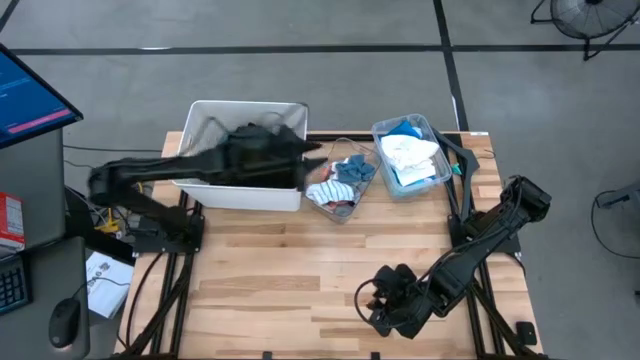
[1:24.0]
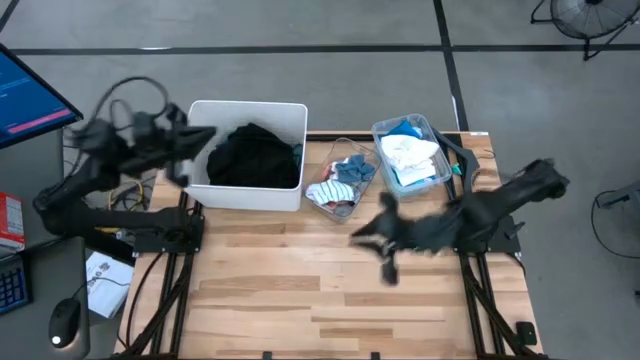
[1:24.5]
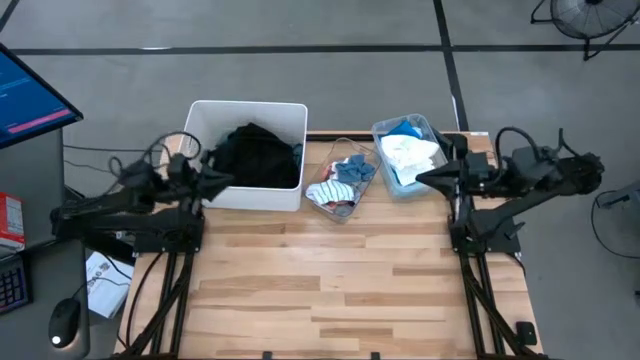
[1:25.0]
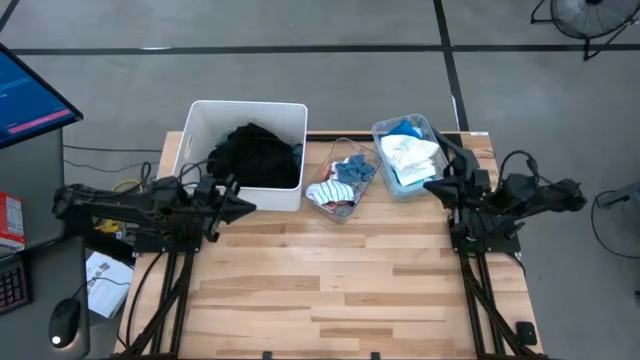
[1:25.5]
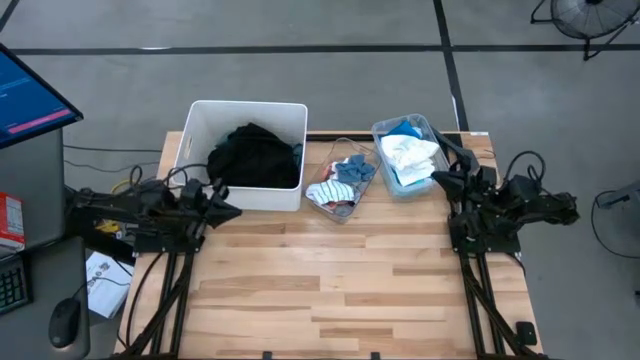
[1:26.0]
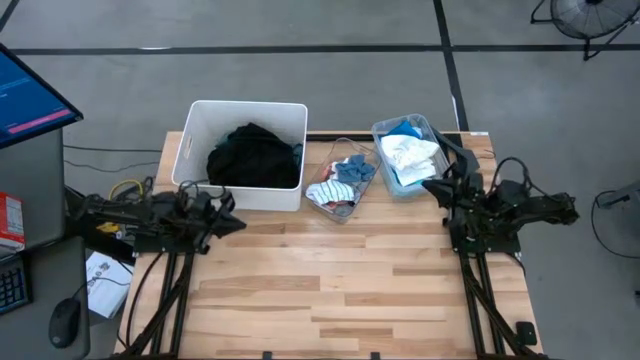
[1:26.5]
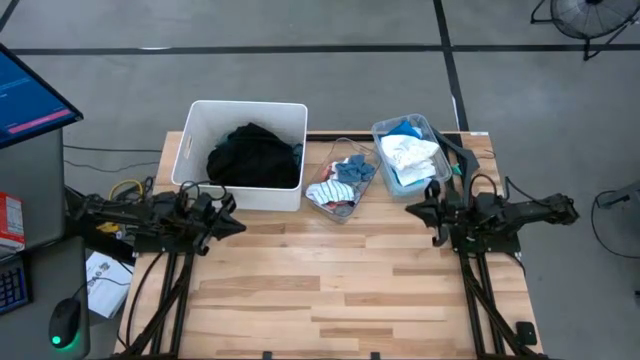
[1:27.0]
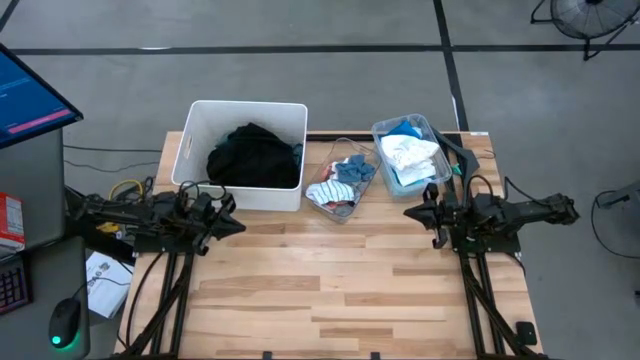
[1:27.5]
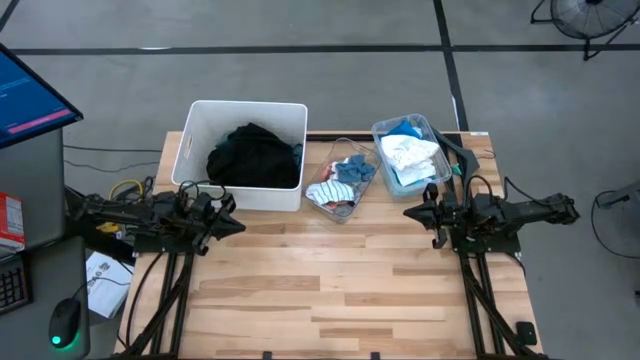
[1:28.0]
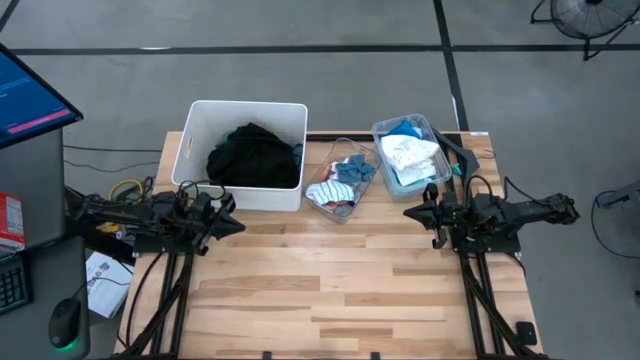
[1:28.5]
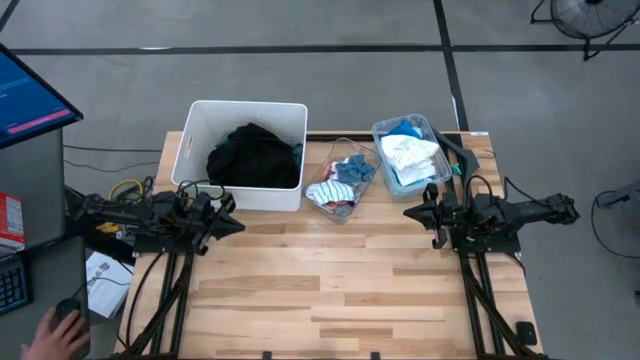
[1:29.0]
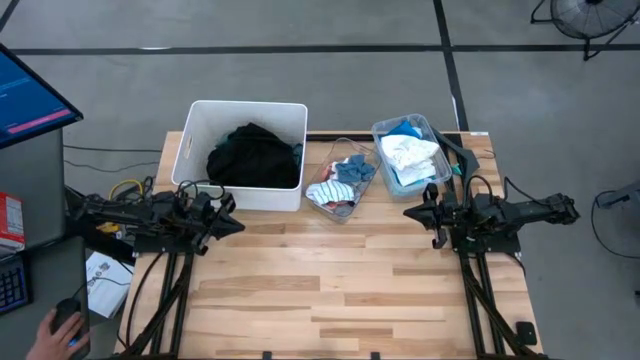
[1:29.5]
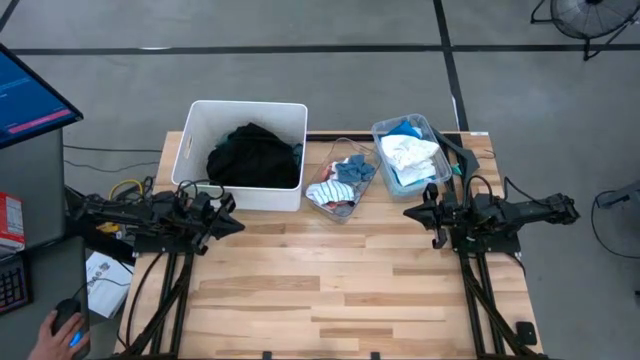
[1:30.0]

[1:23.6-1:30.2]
Task: Pick & Place Cloths
Return to Home Position

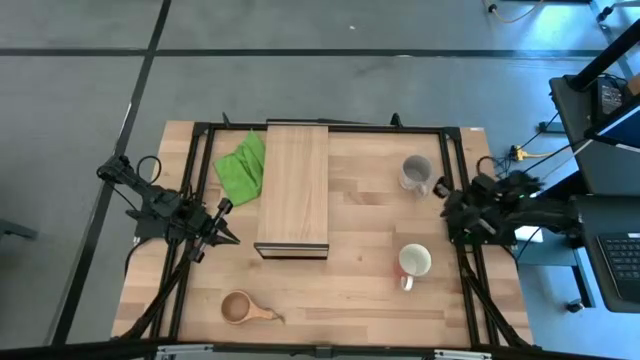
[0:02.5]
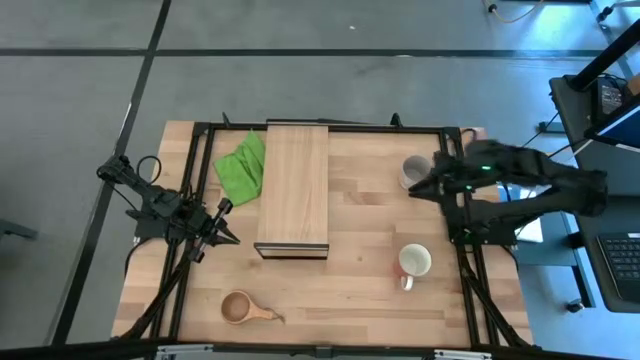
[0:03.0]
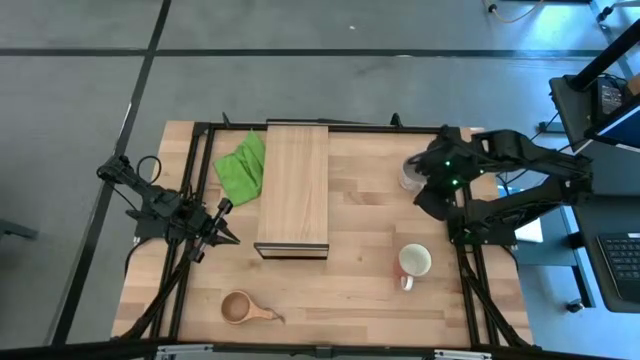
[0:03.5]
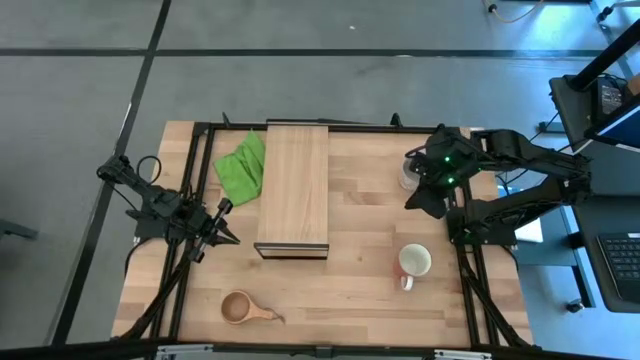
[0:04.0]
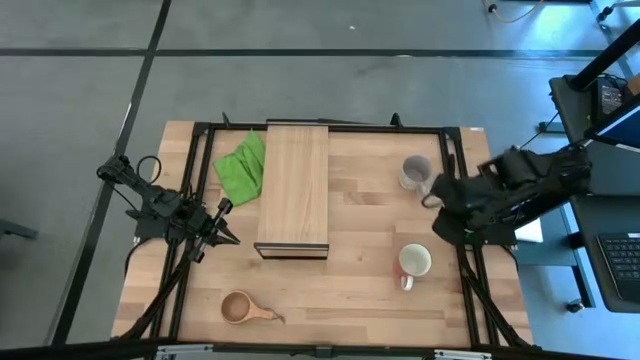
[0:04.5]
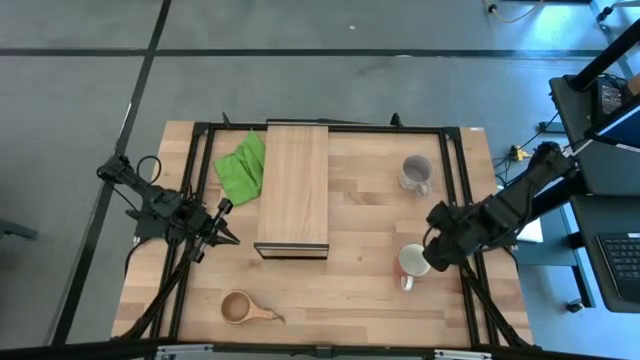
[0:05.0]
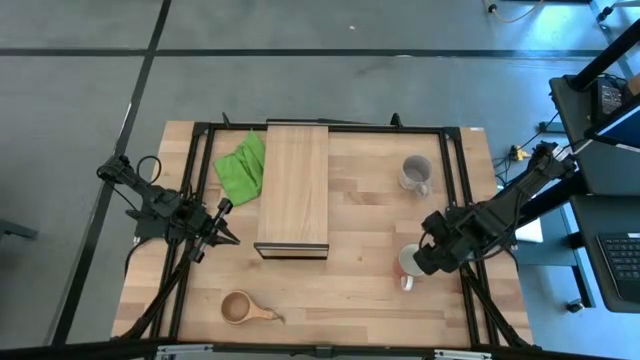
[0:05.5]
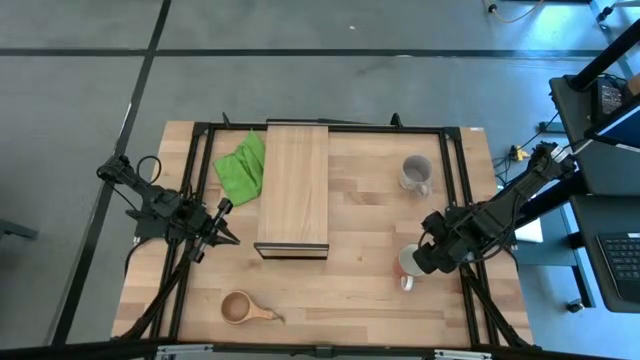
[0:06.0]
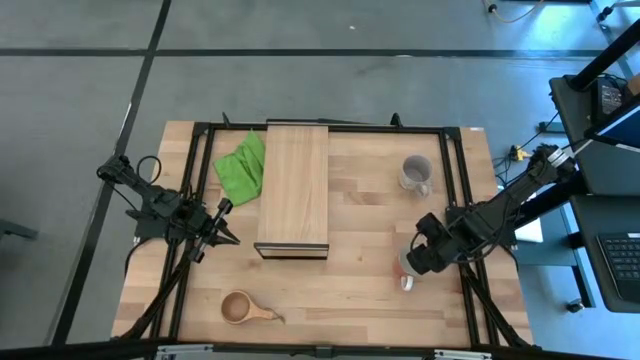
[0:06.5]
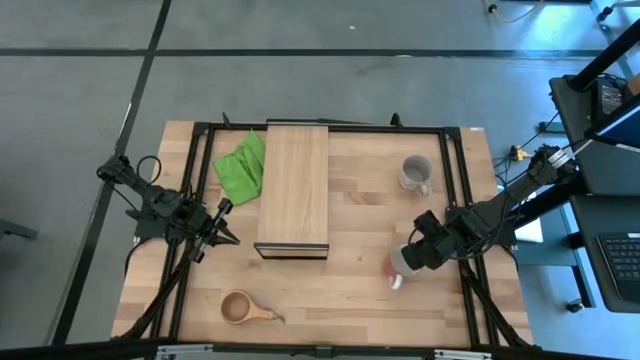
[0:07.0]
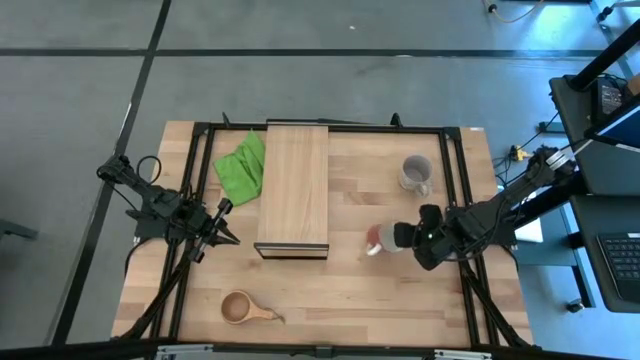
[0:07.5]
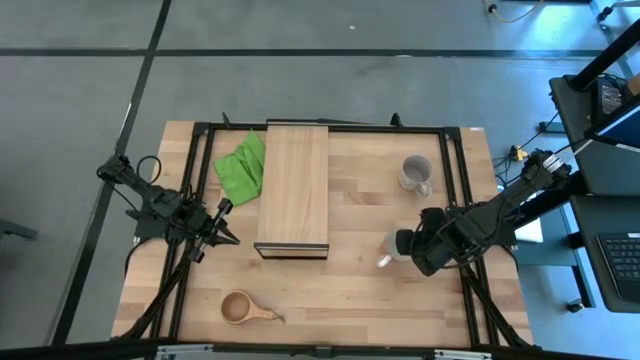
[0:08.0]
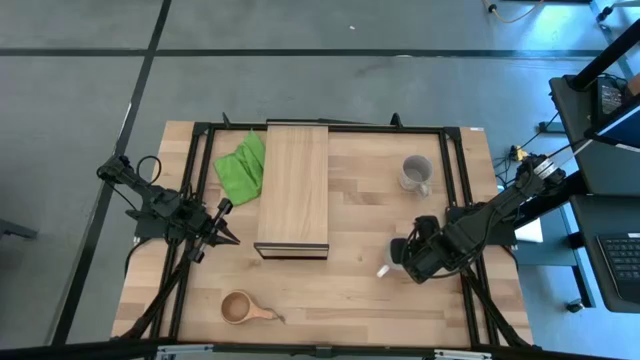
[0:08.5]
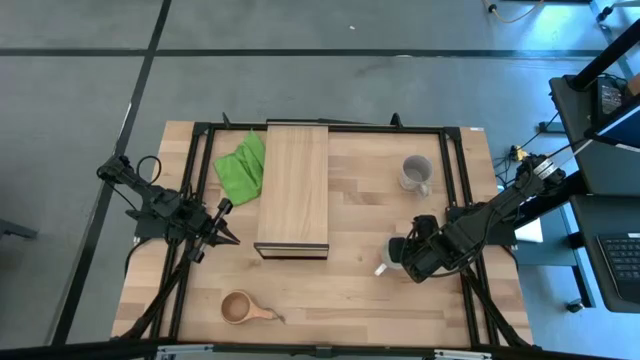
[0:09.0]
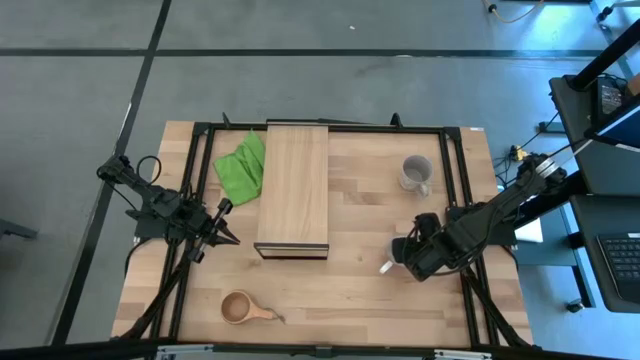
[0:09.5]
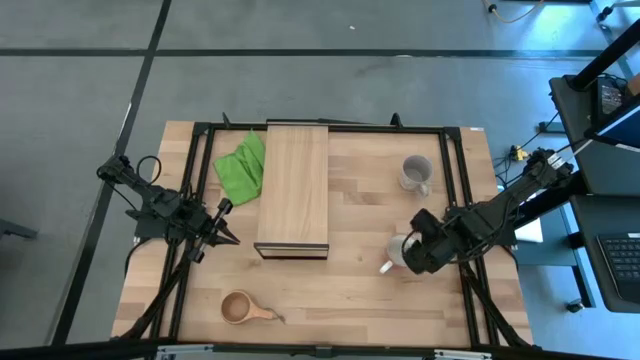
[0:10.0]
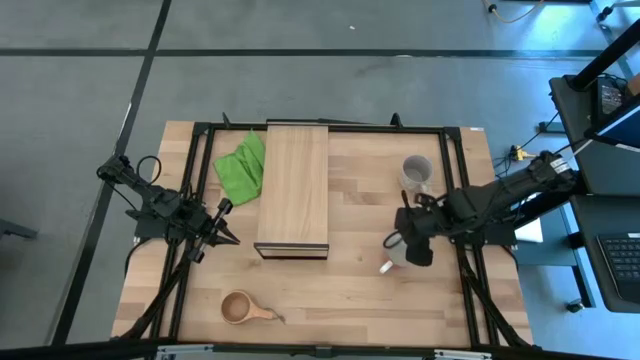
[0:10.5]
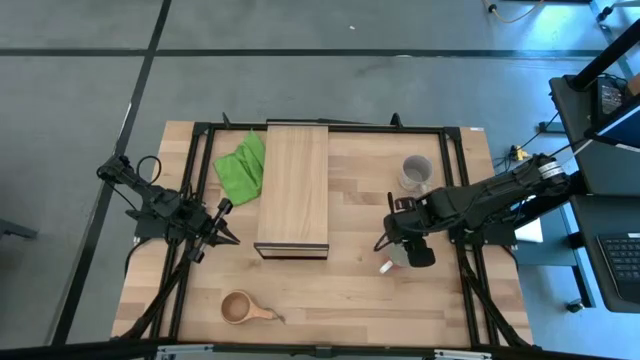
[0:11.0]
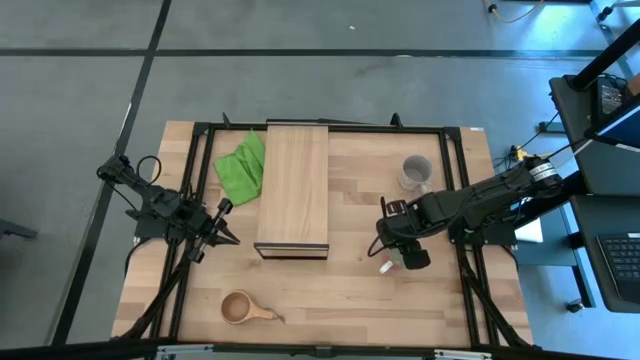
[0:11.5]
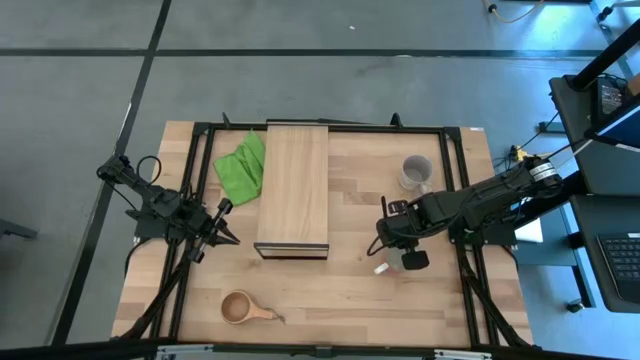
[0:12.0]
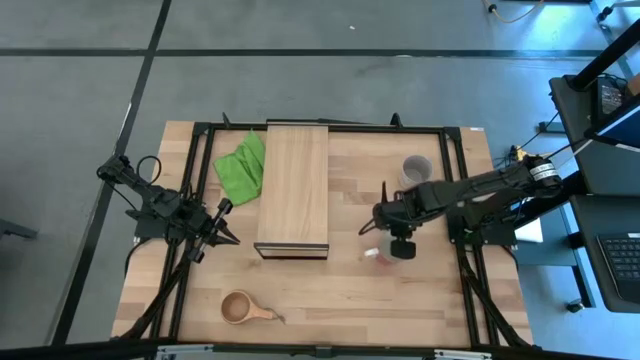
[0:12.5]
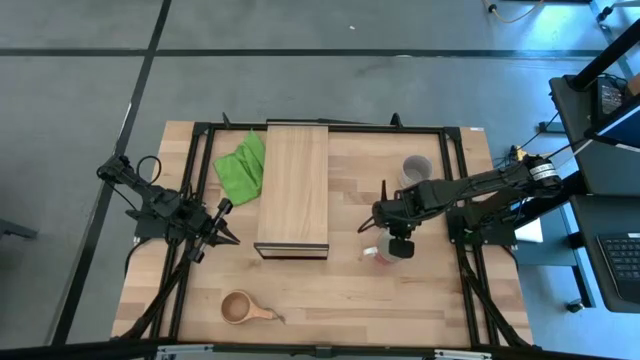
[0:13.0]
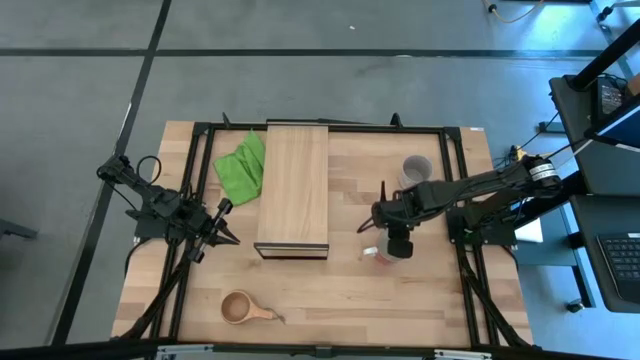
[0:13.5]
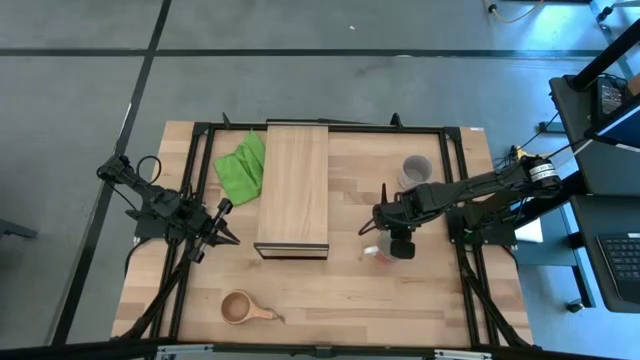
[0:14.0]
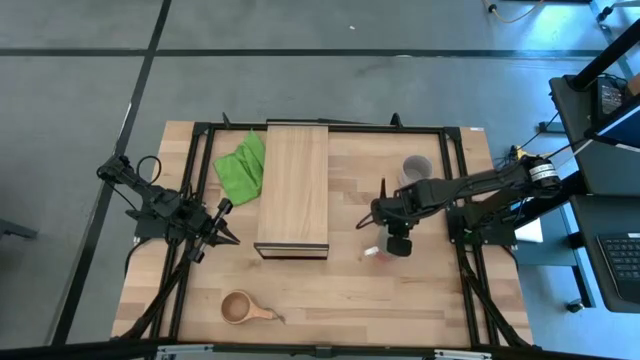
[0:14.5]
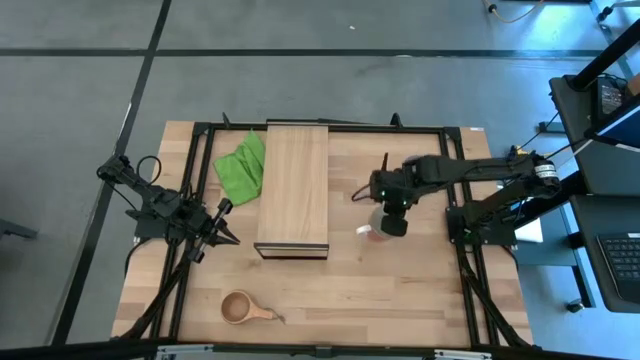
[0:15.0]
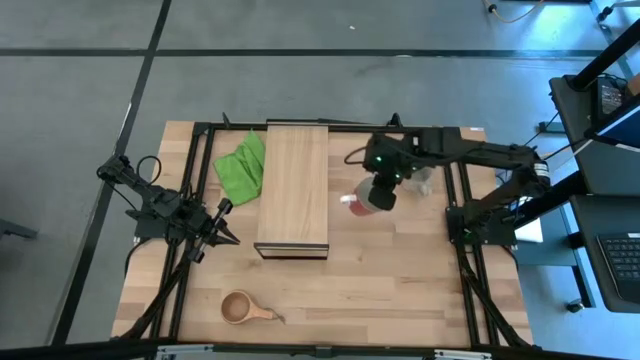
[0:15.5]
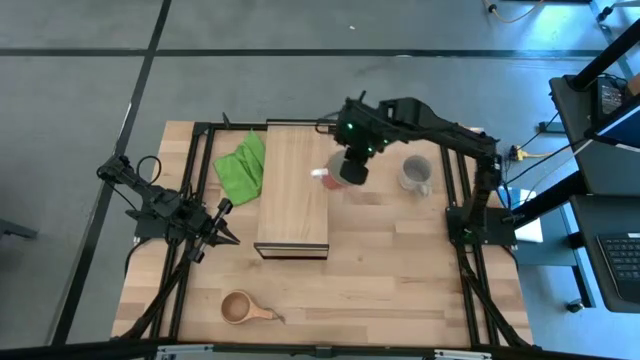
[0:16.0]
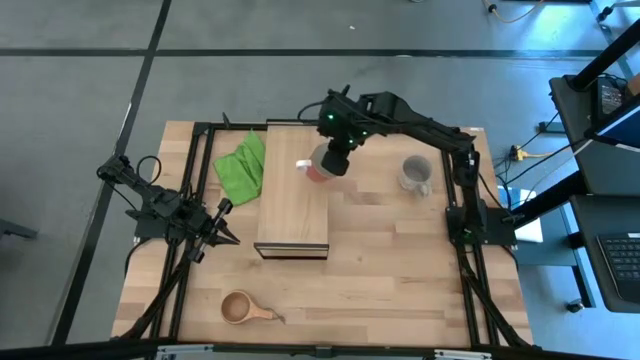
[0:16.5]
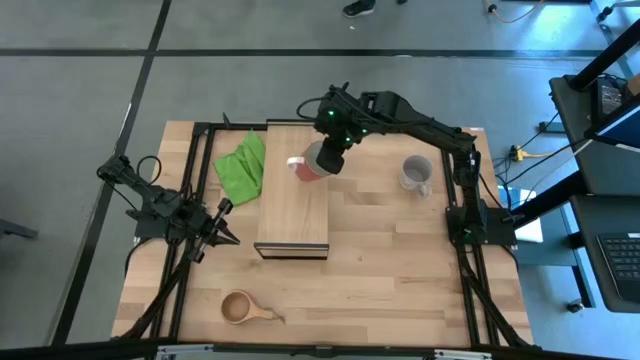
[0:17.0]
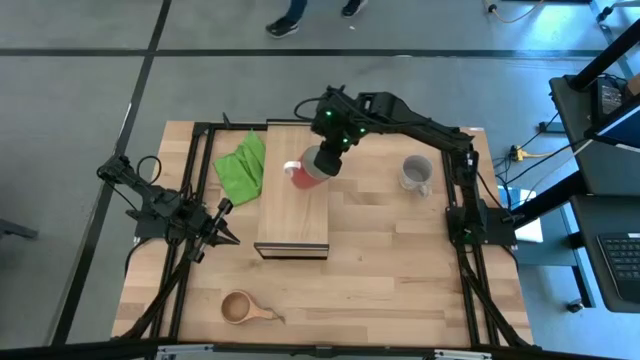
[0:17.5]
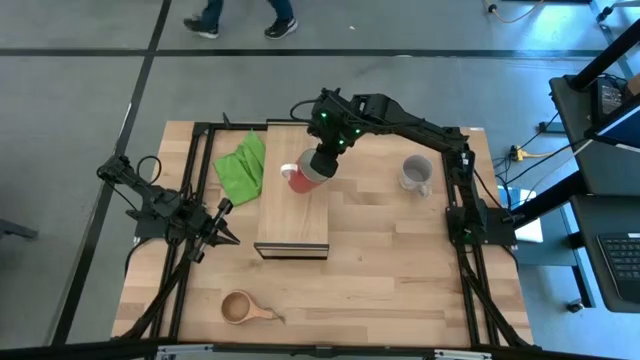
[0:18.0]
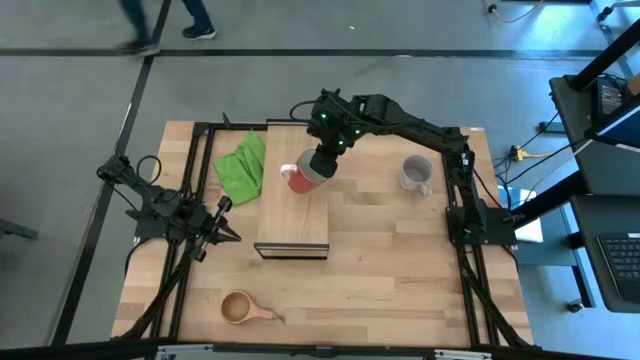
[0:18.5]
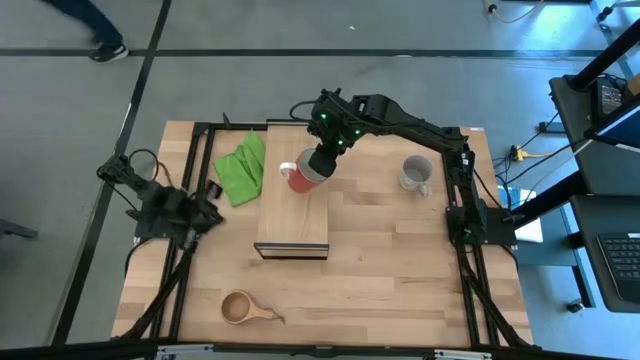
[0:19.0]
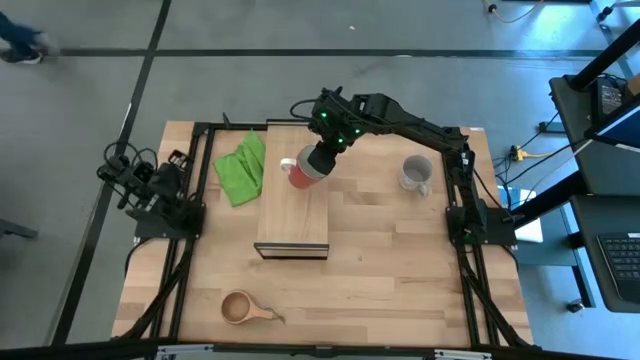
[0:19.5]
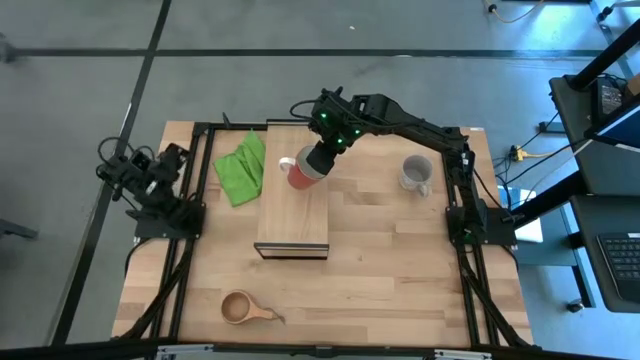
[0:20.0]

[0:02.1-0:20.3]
Task: Stack small to large cups/mugs on shelf
Put the red mug on the shelf
